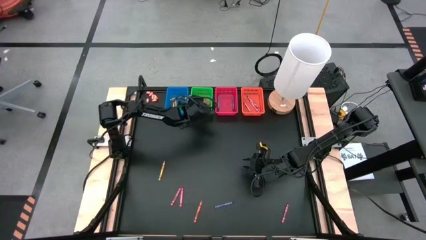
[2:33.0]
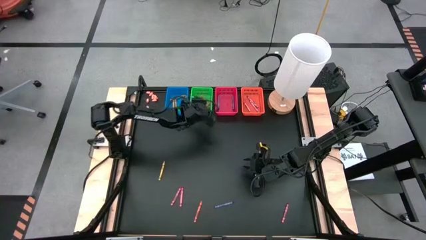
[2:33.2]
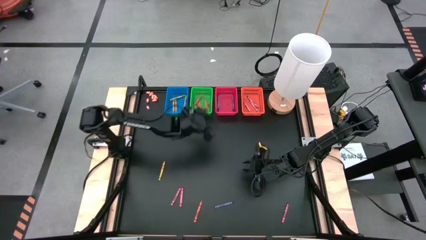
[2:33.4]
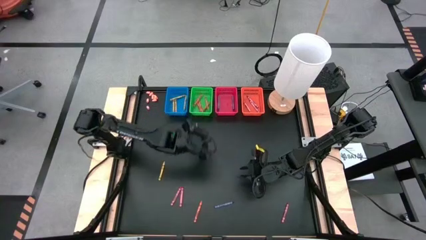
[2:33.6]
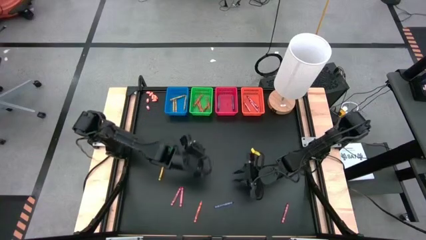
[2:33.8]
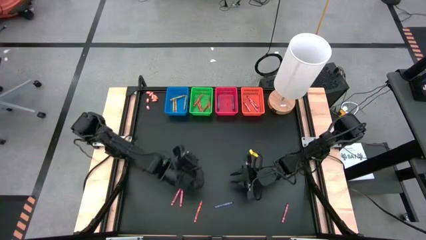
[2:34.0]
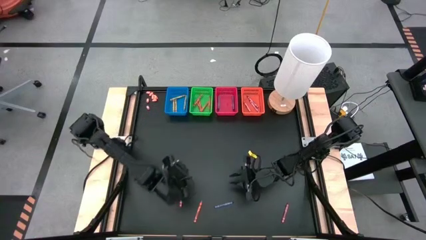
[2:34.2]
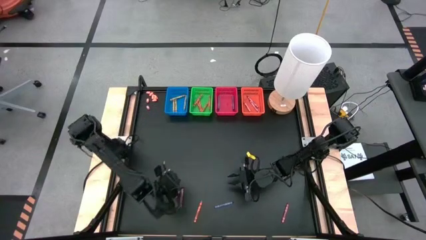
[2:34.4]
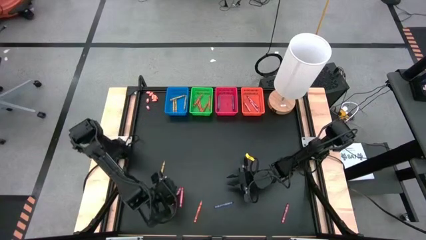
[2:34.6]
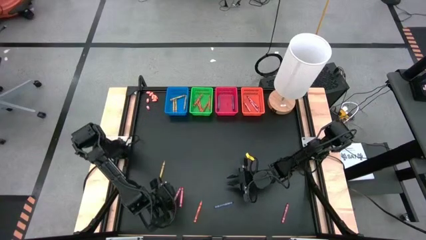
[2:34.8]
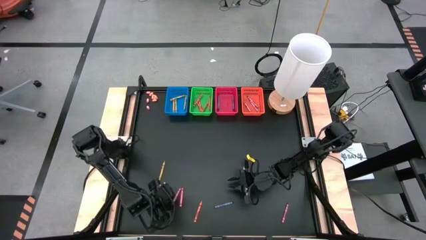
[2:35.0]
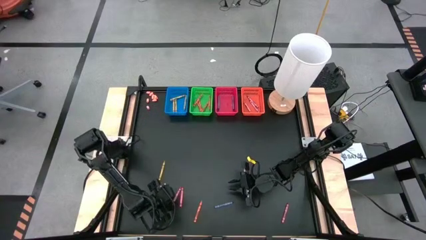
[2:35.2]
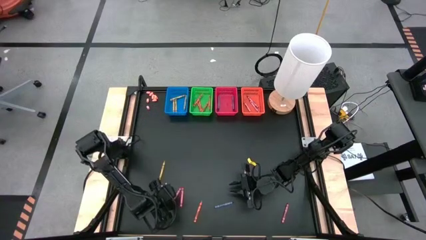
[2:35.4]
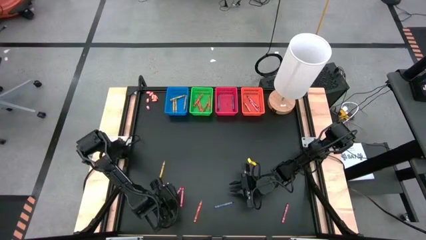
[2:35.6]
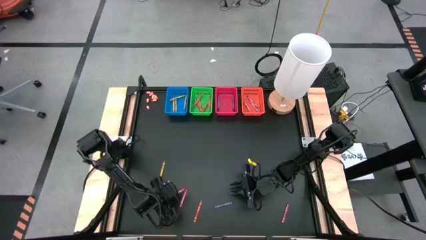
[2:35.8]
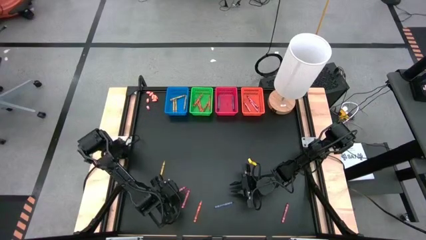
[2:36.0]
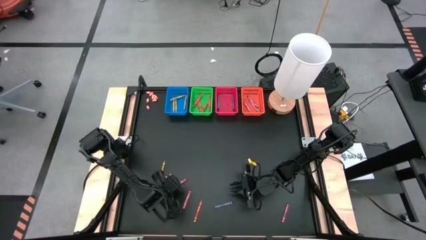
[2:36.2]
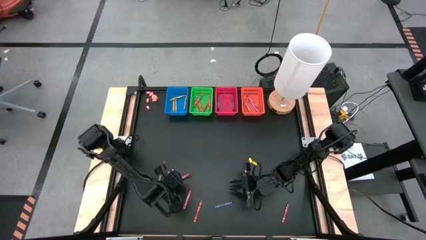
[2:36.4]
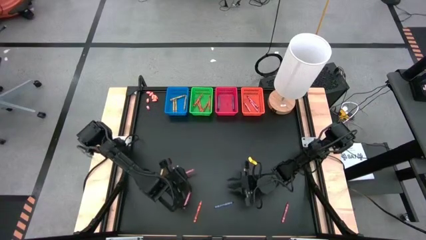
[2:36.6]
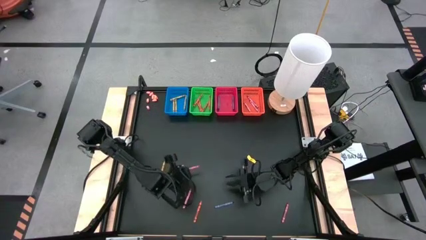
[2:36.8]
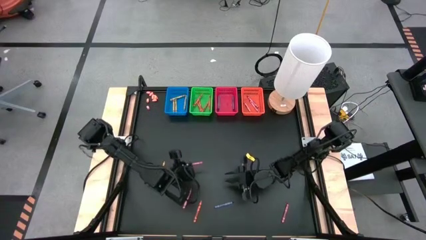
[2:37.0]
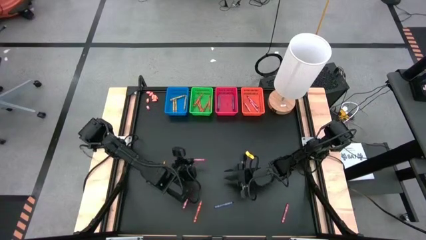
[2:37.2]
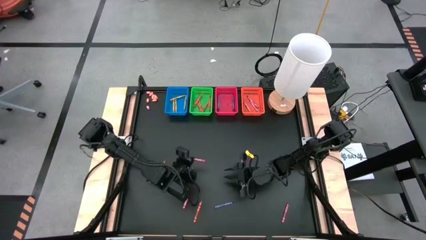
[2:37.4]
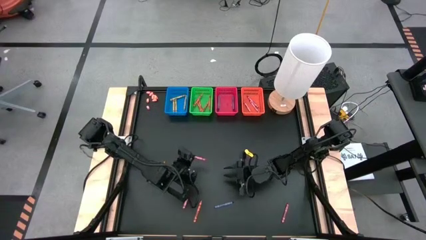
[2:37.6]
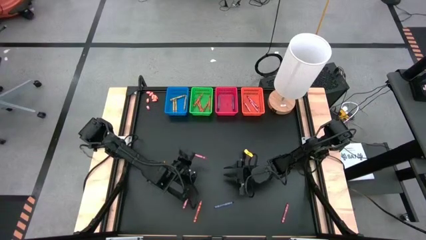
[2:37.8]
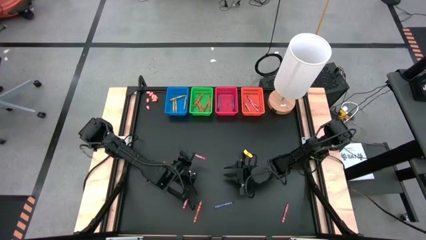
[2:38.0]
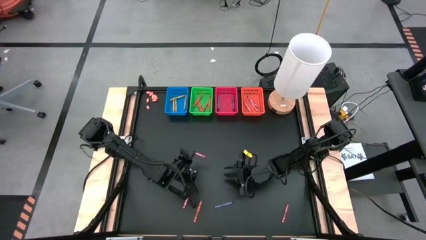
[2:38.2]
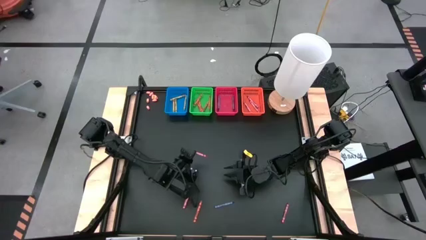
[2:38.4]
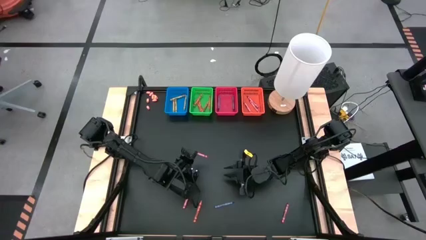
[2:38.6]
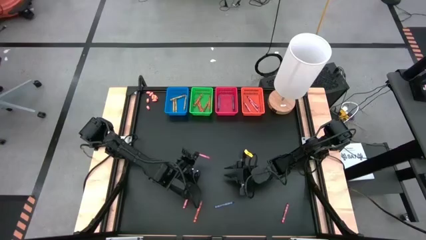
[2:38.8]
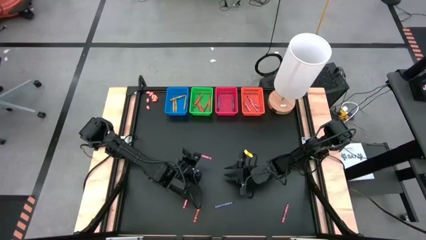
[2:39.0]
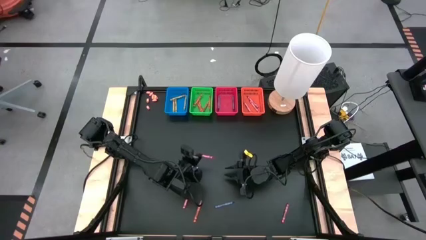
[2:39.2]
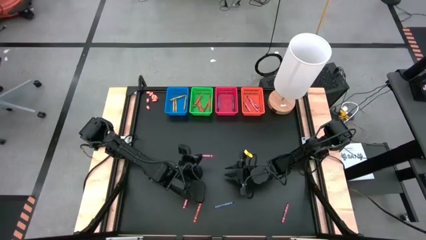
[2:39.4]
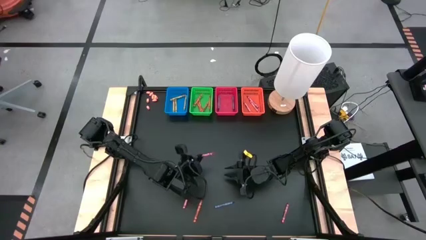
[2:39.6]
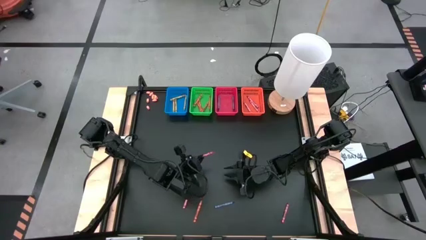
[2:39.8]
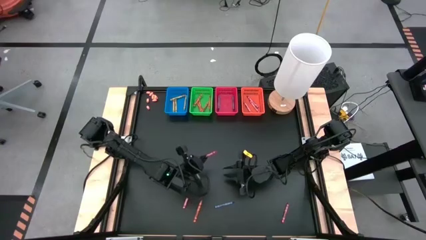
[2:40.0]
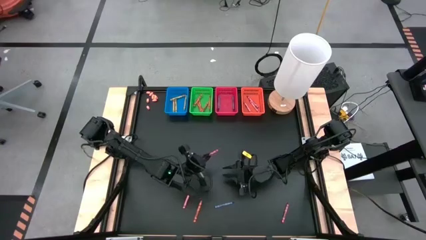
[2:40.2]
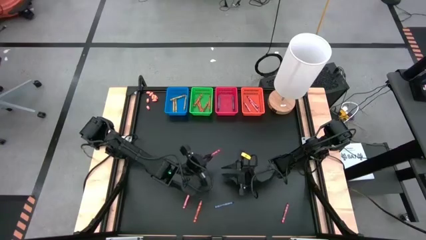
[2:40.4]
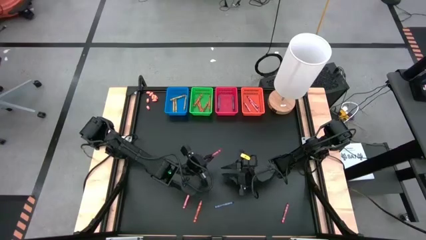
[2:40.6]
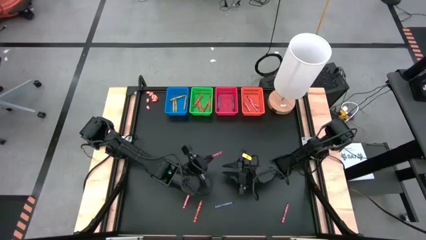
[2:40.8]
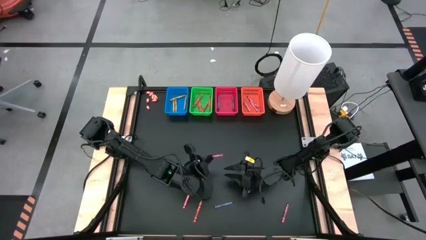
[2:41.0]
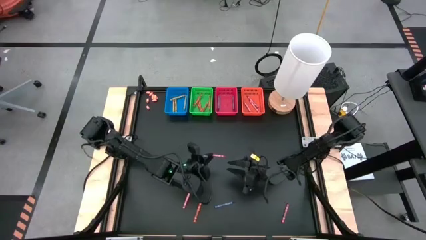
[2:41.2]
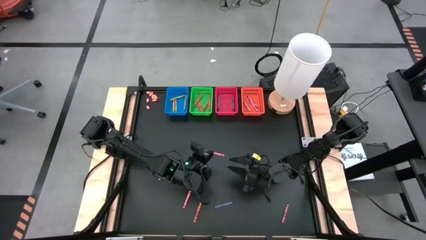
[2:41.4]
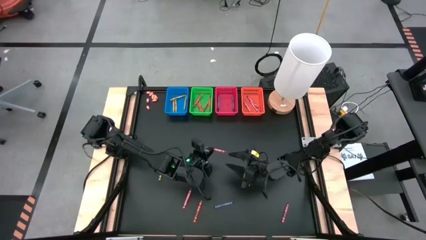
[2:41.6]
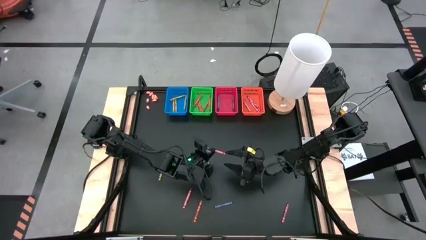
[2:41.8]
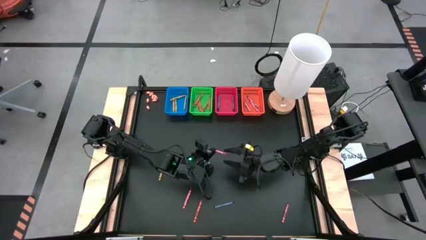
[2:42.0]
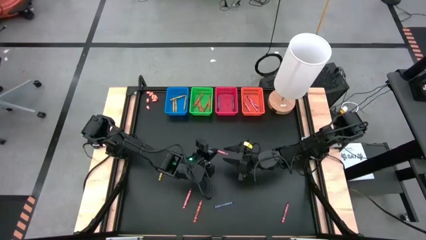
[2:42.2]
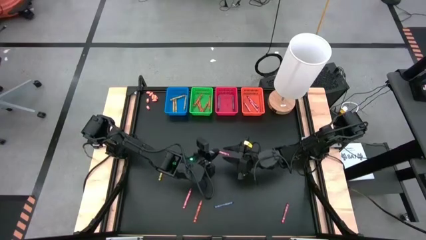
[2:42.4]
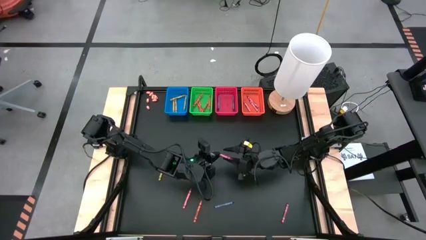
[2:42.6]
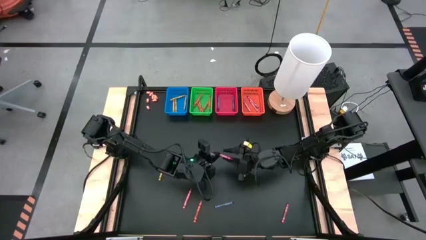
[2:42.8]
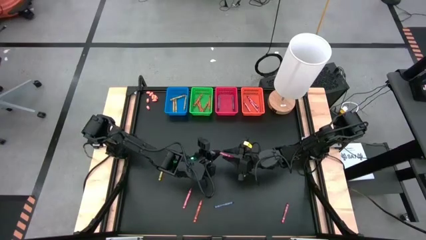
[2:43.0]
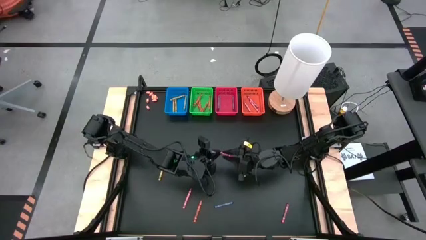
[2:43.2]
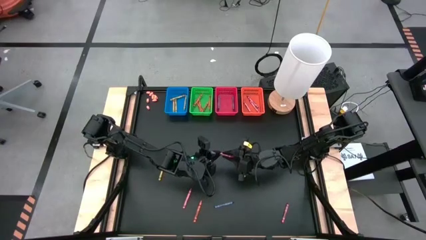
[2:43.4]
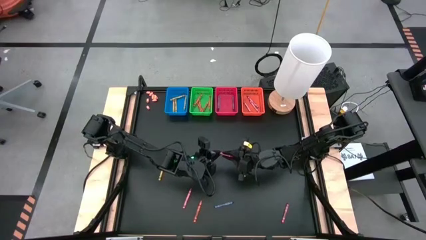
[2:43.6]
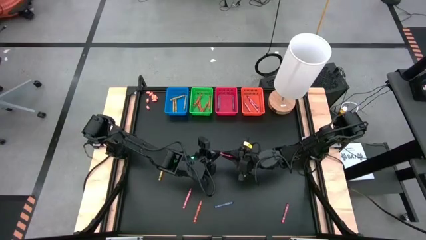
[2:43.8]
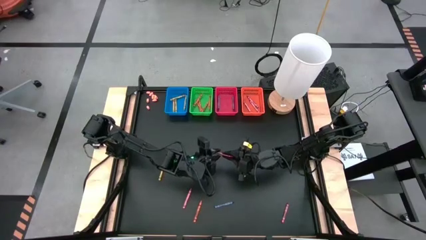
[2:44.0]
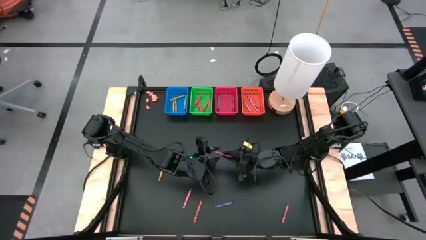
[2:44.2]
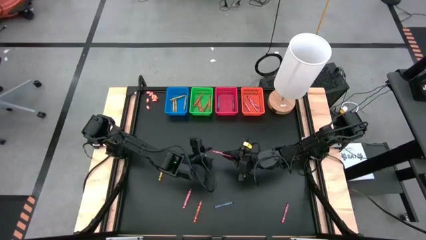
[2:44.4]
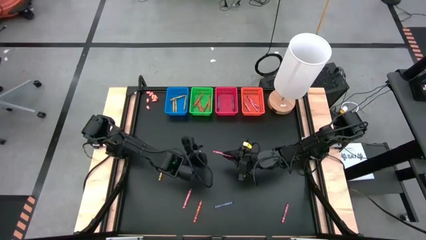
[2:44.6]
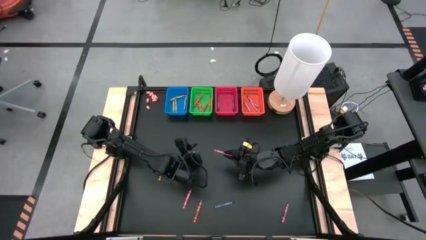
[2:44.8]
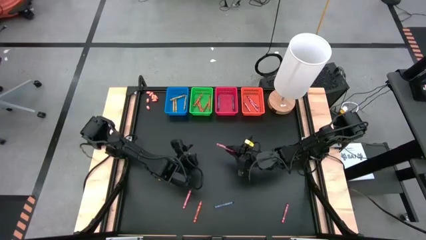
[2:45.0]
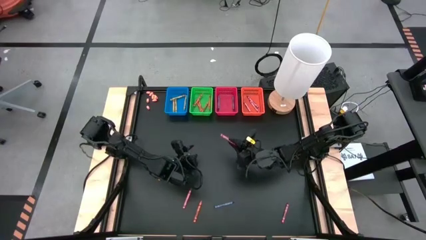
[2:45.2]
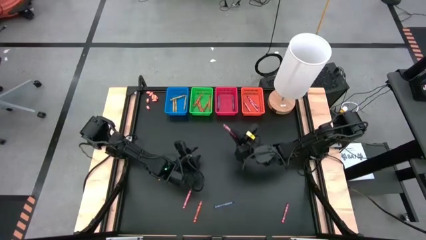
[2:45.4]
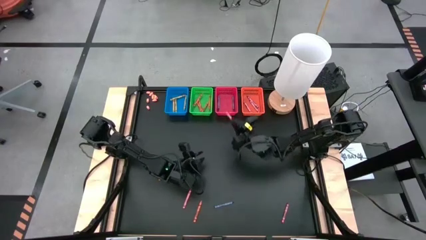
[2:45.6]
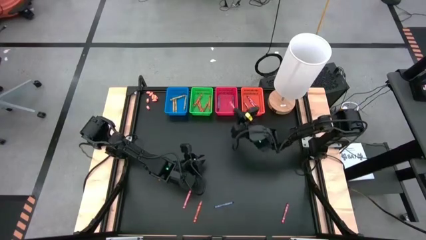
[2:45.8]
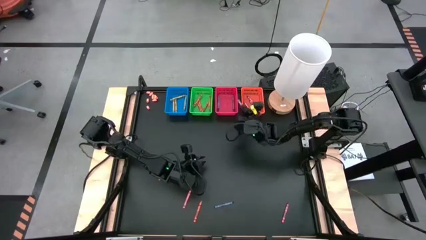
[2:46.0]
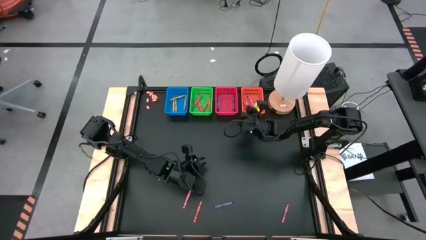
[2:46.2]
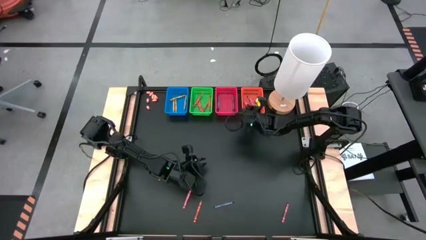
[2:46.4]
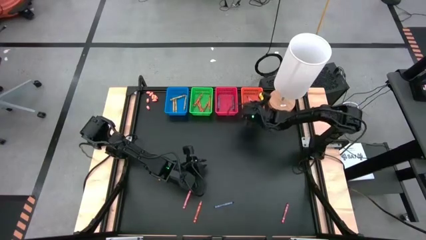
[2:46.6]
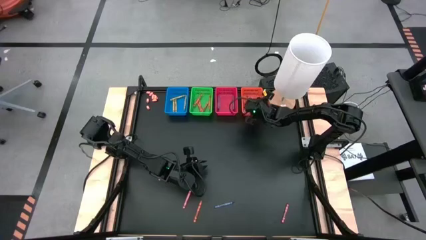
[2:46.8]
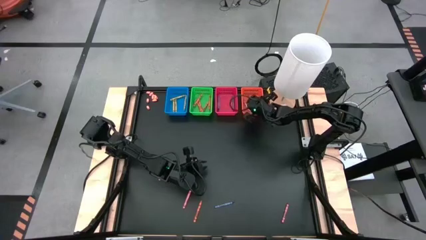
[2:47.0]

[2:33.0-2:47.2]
Task: Sort crayons
Put the red crayon into the orange bin

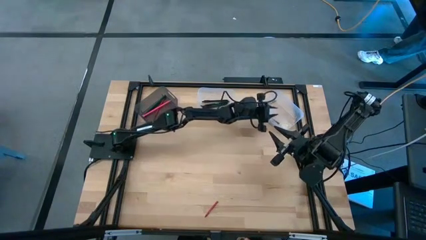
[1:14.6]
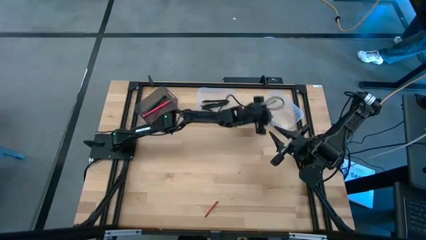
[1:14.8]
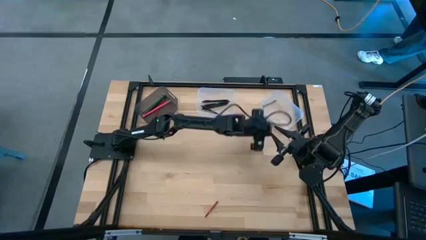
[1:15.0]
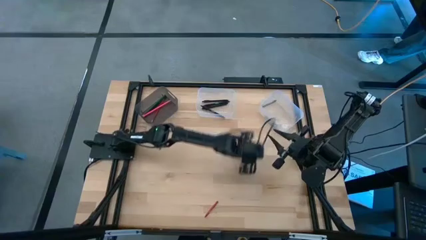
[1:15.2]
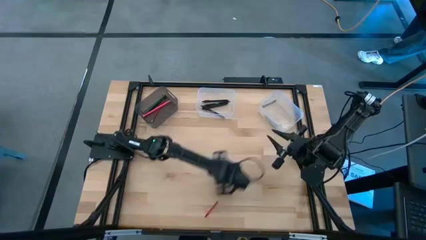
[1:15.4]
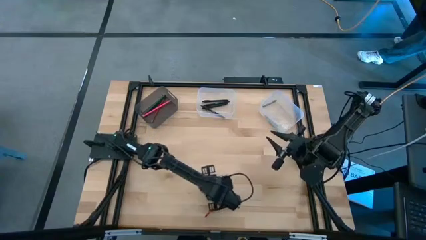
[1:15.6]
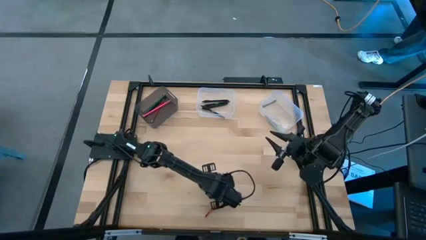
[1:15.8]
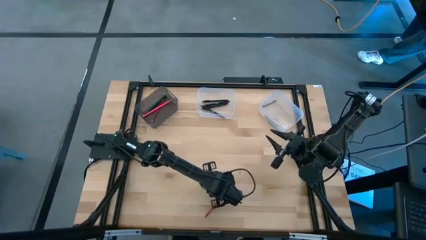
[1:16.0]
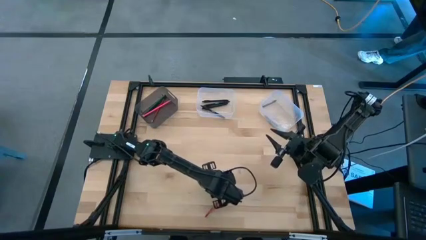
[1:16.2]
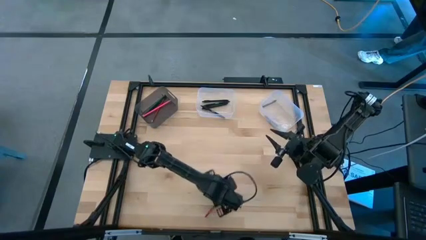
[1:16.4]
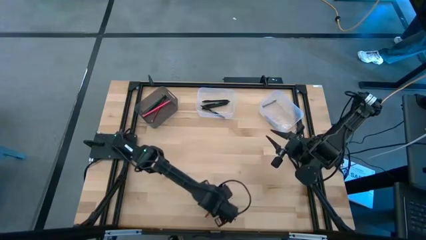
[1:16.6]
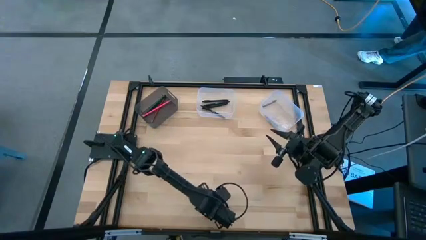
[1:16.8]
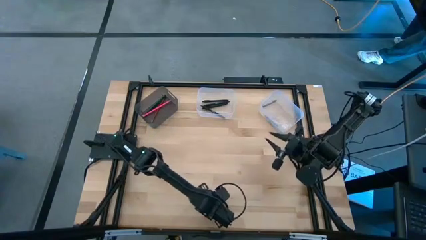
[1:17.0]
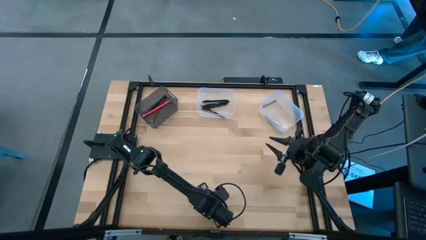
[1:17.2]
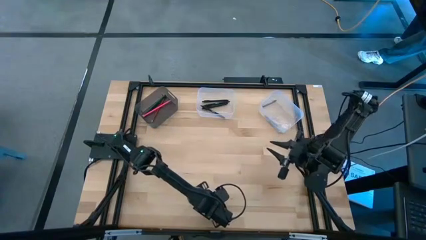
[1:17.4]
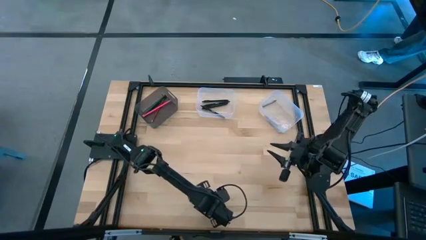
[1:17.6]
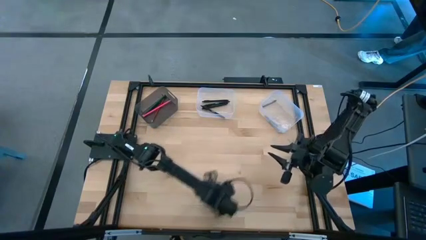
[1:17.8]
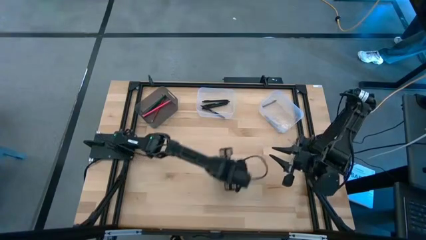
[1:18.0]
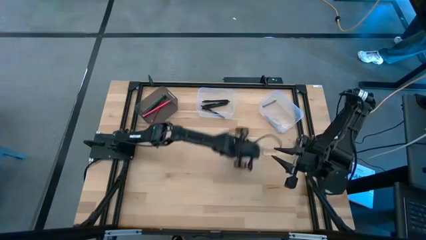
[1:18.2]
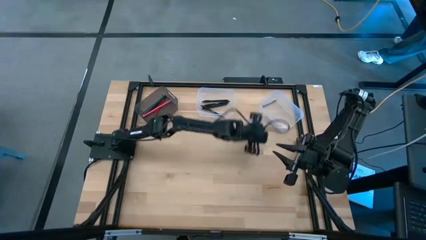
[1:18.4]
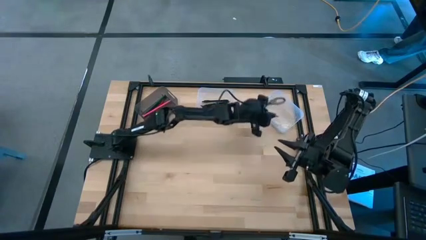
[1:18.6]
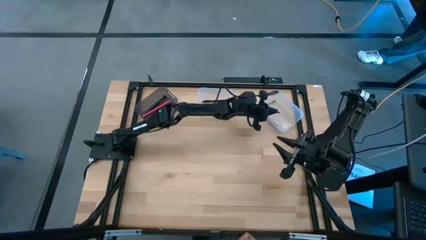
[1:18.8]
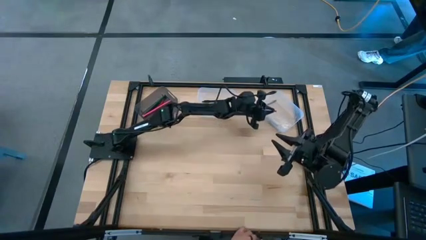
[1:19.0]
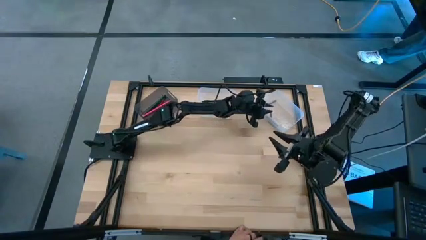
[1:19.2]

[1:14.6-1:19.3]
Task: Sort crayons/erasers/pens/pencils in bins
Put the red crayon into the right transparent bin
